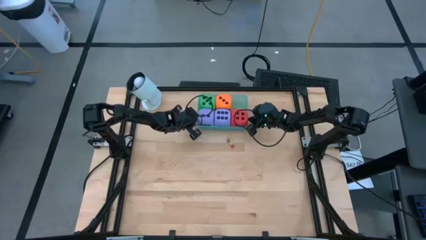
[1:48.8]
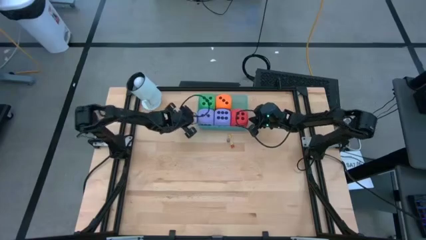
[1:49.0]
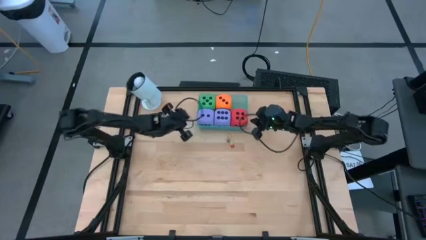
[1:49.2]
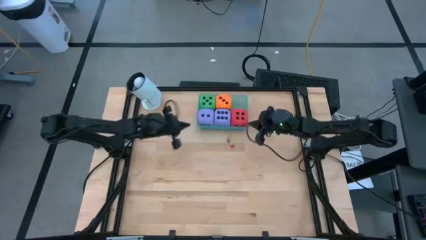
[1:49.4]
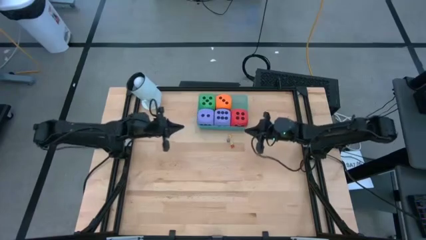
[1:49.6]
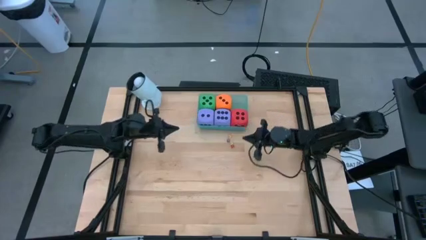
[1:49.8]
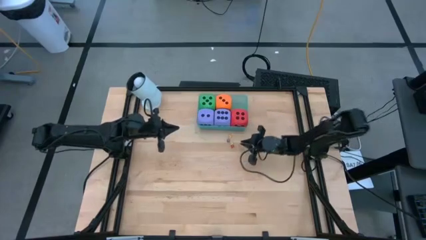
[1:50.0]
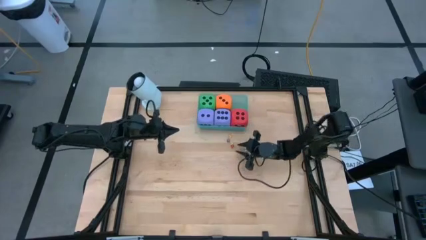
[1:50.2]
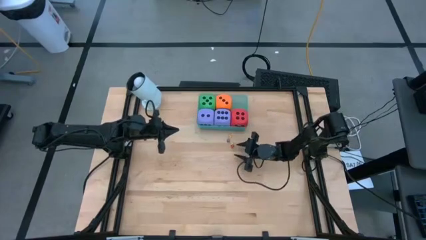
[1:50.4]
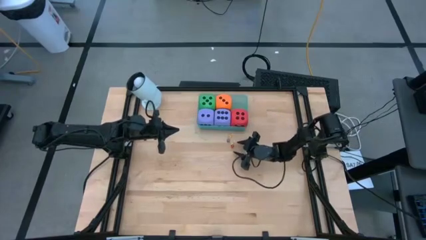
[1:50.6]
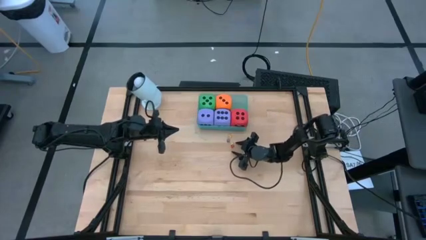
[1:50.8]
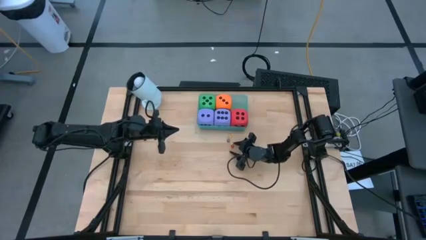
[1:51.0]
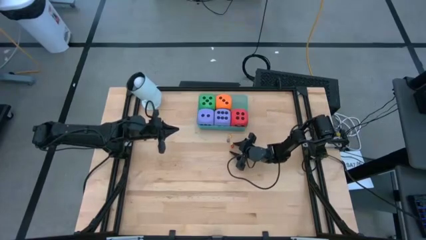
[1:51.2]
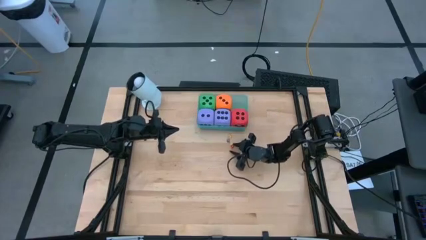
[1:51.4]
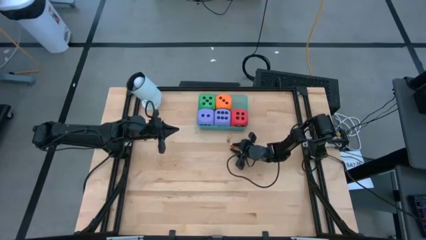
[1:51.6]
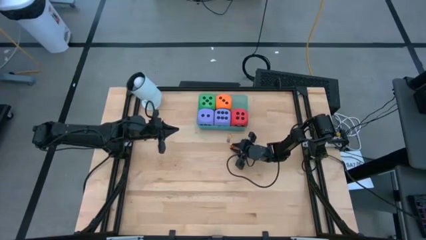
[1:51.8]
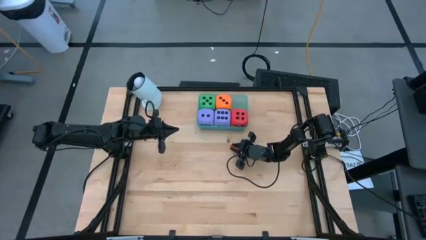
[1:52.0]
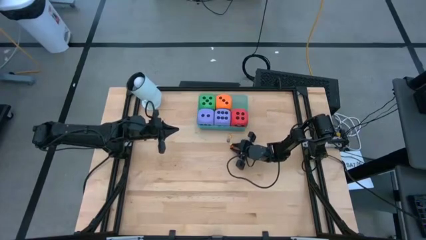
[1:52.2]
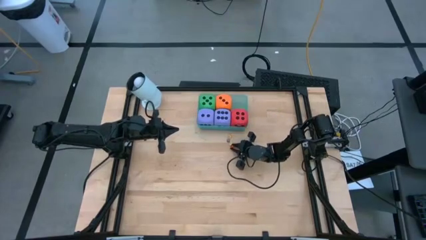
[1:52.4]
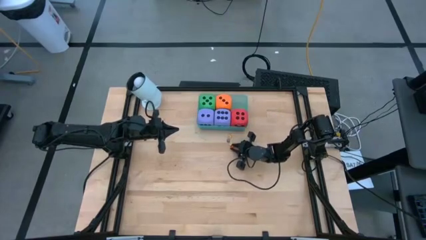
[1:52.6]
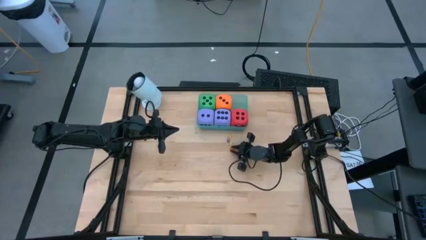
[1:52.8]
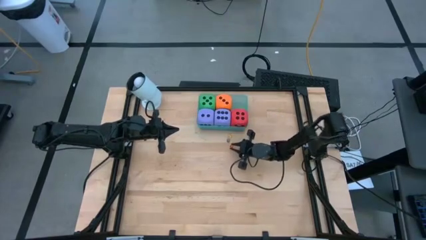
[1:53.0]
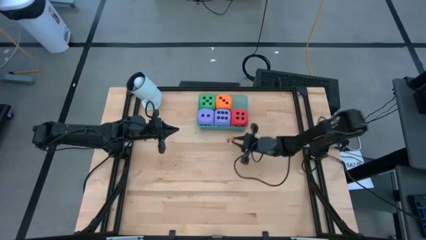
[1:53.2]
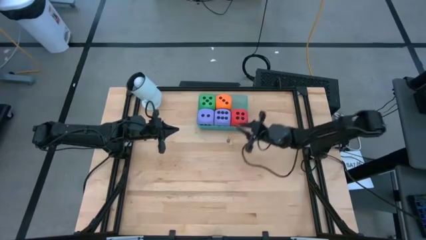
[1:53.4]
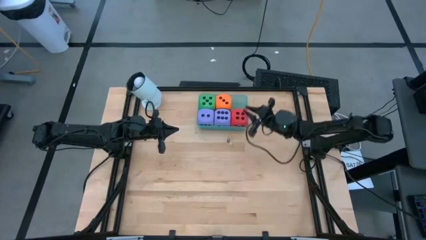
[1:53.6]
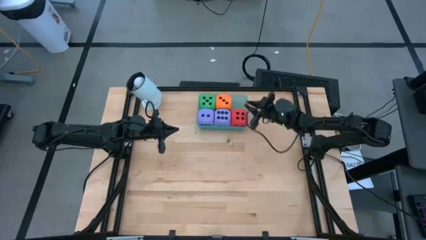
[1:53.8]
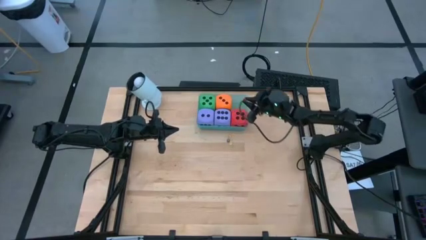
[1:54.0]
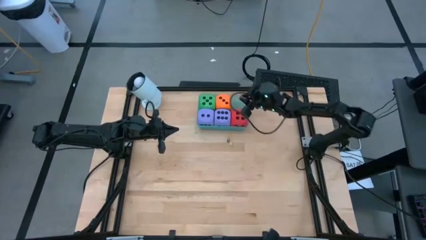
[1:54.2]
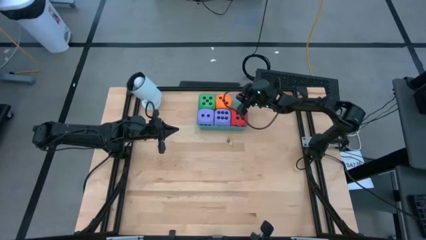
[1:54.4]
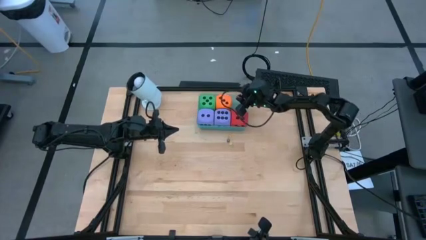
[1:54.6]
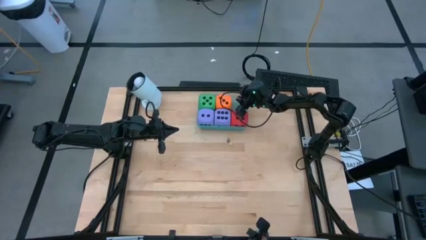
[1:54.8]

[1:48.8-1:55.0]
Task: Pick & Place Dice
Put the small red dice into the green container

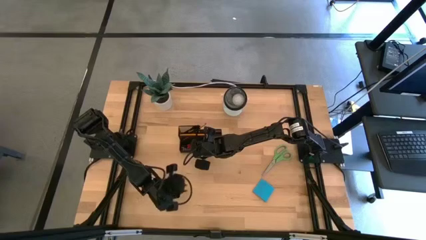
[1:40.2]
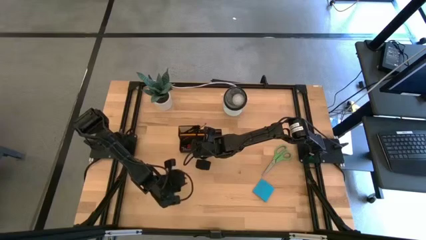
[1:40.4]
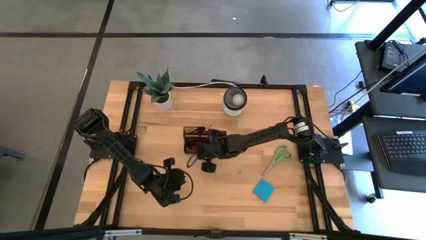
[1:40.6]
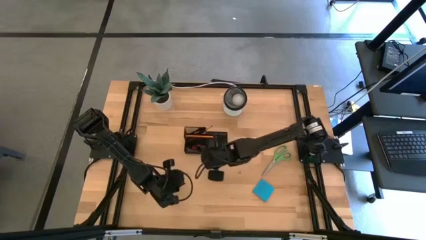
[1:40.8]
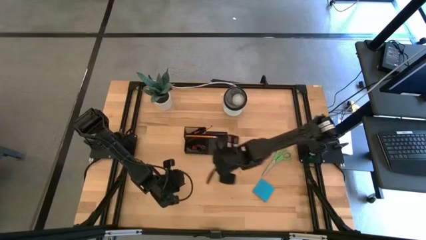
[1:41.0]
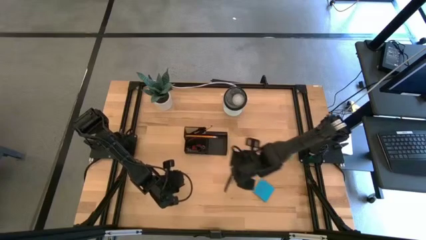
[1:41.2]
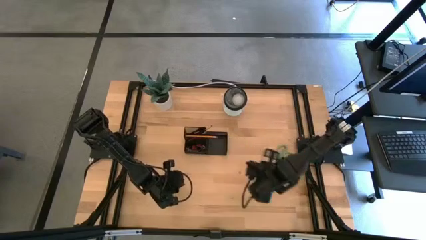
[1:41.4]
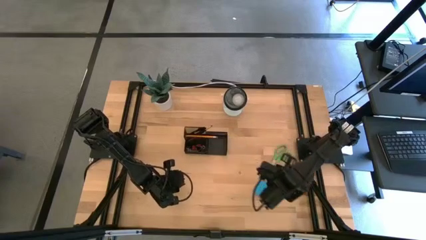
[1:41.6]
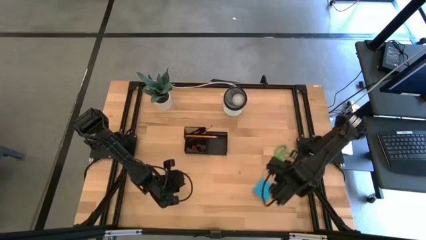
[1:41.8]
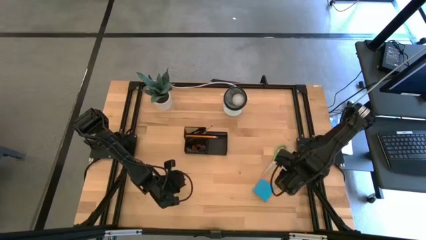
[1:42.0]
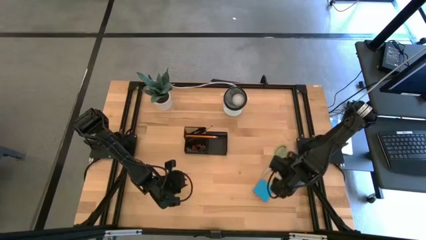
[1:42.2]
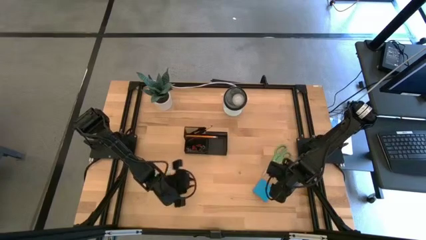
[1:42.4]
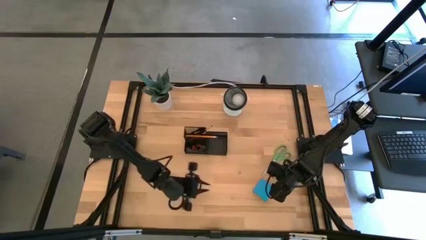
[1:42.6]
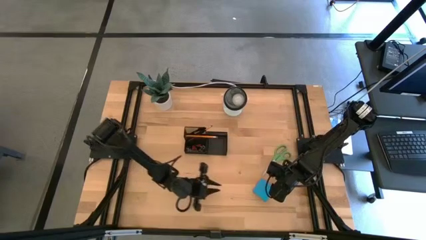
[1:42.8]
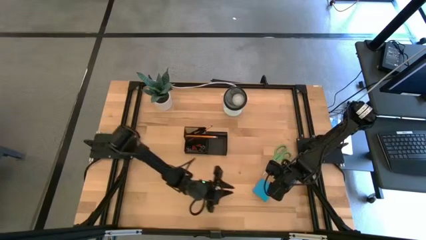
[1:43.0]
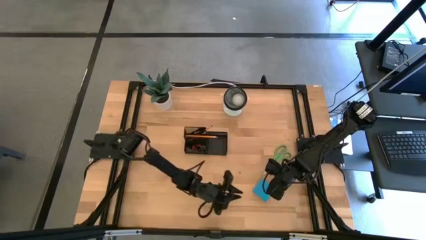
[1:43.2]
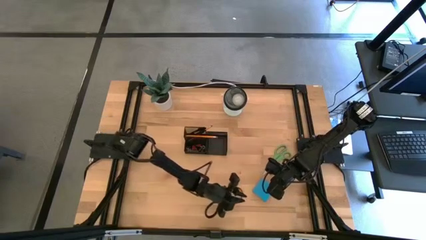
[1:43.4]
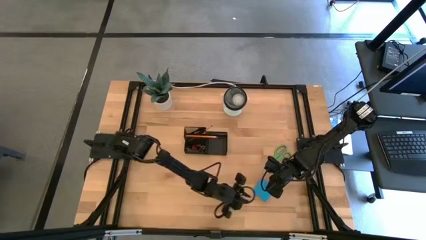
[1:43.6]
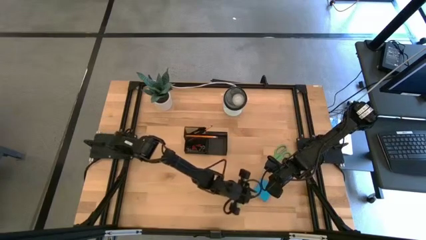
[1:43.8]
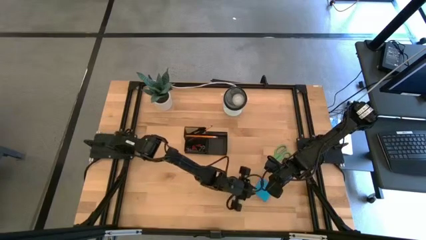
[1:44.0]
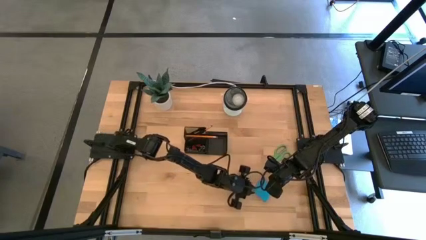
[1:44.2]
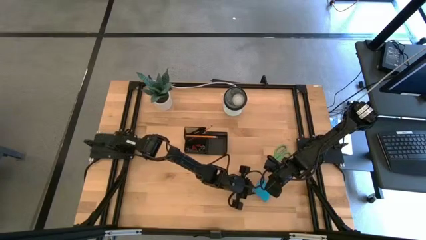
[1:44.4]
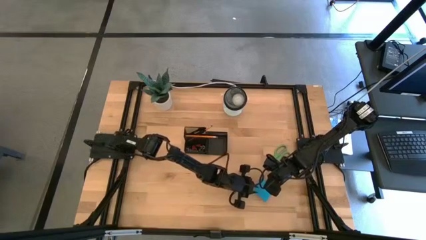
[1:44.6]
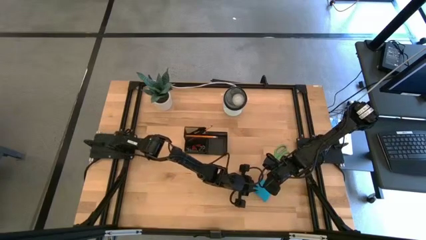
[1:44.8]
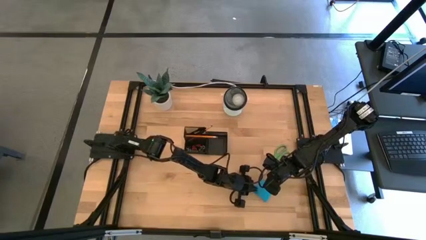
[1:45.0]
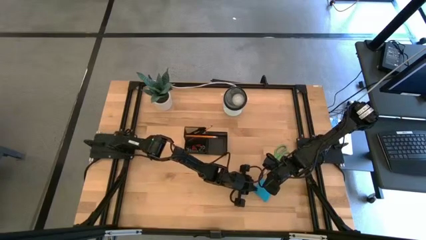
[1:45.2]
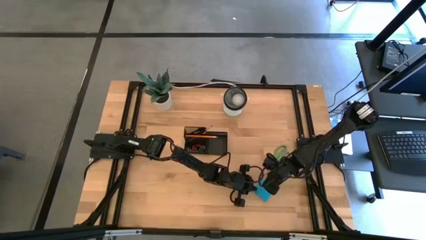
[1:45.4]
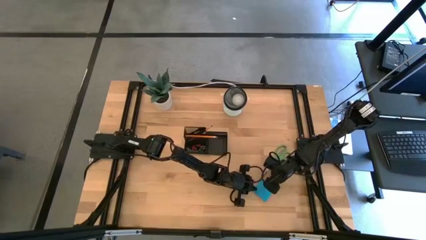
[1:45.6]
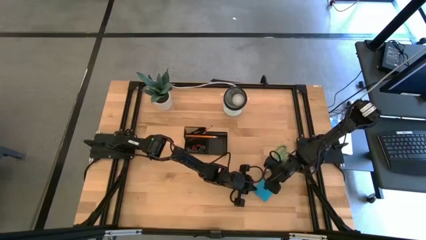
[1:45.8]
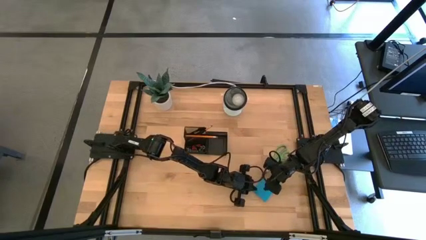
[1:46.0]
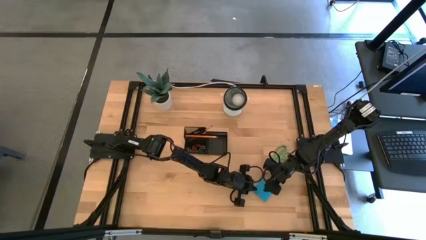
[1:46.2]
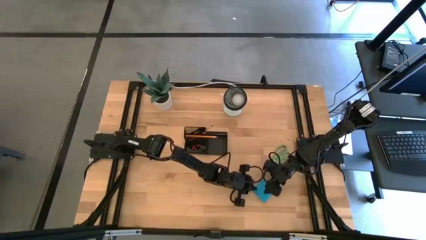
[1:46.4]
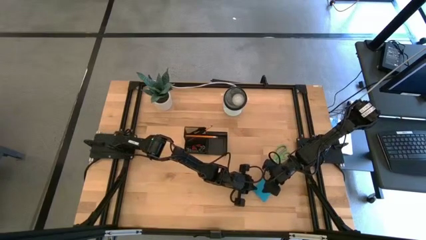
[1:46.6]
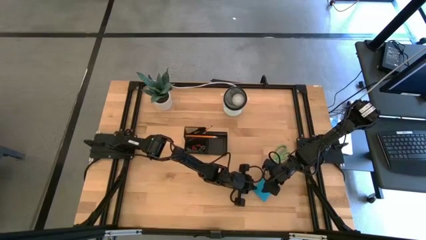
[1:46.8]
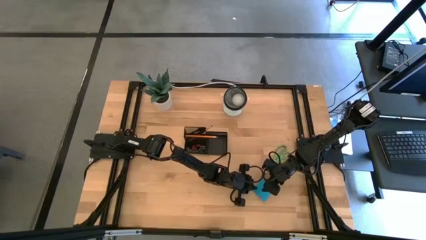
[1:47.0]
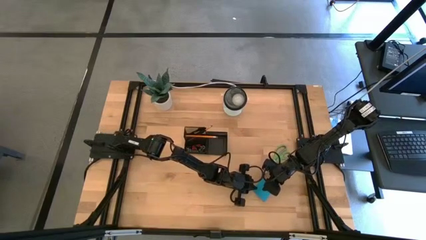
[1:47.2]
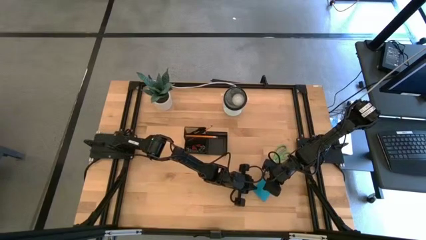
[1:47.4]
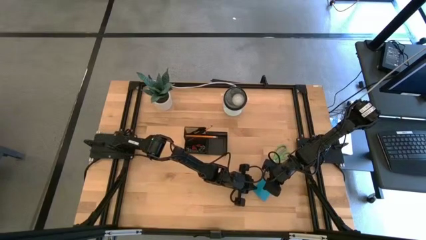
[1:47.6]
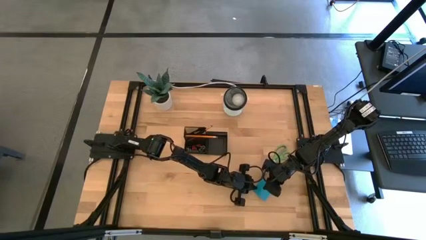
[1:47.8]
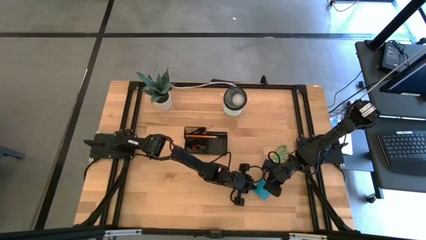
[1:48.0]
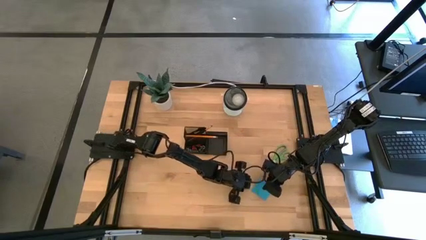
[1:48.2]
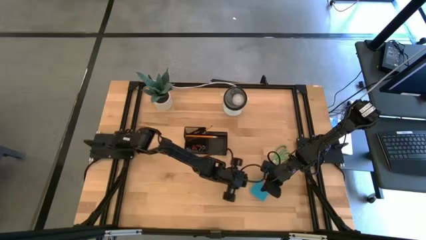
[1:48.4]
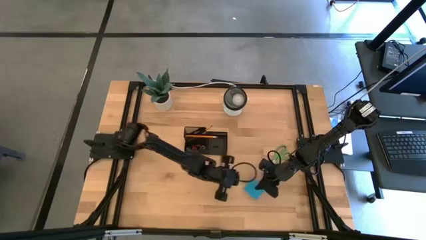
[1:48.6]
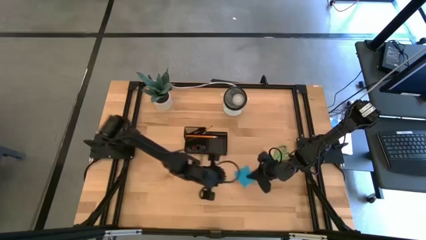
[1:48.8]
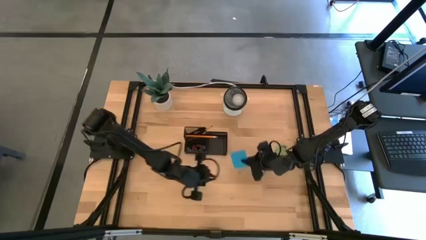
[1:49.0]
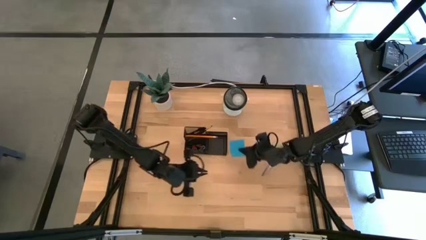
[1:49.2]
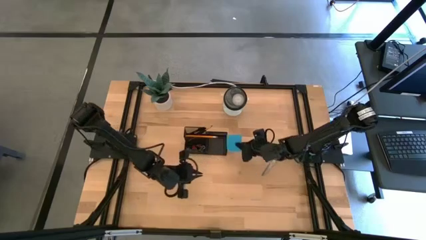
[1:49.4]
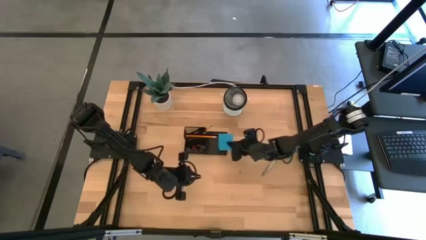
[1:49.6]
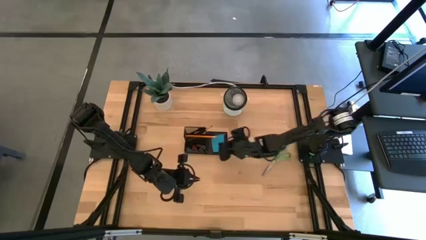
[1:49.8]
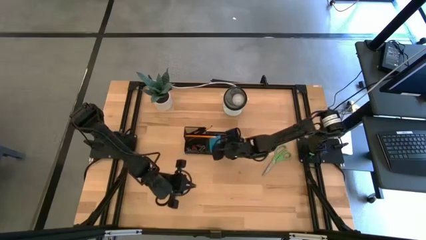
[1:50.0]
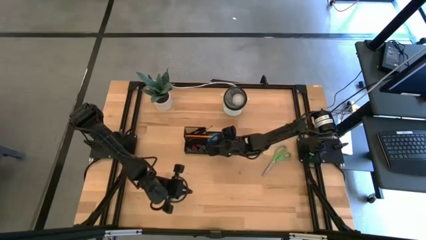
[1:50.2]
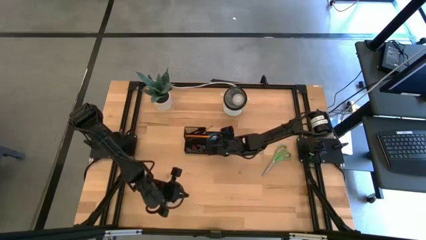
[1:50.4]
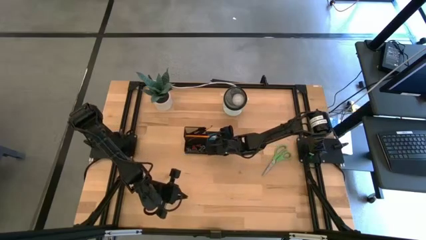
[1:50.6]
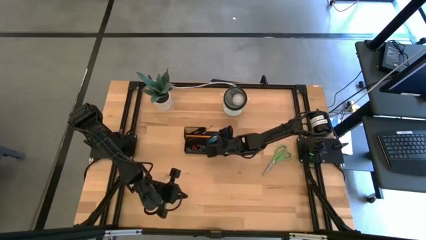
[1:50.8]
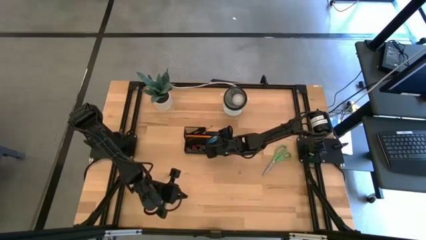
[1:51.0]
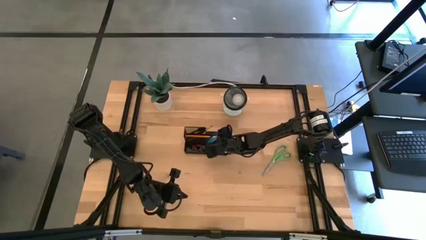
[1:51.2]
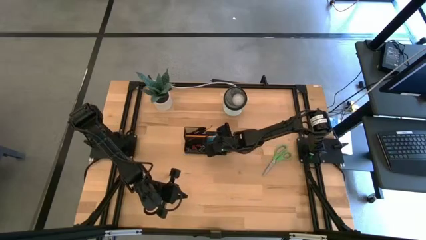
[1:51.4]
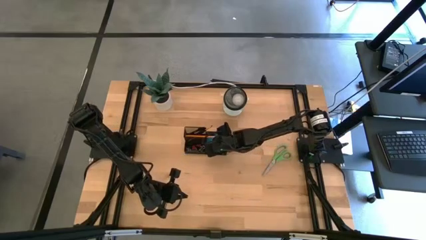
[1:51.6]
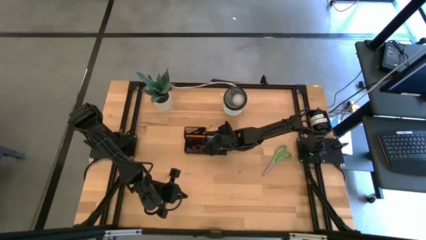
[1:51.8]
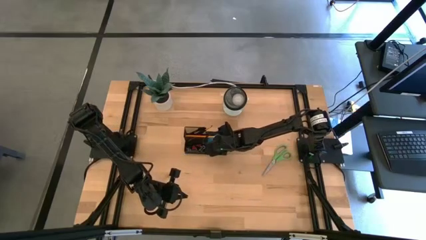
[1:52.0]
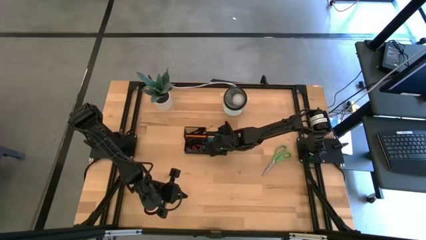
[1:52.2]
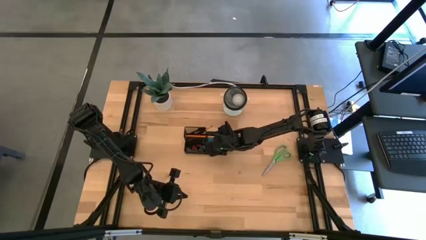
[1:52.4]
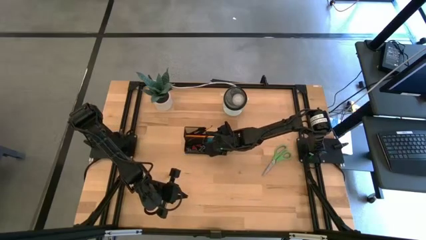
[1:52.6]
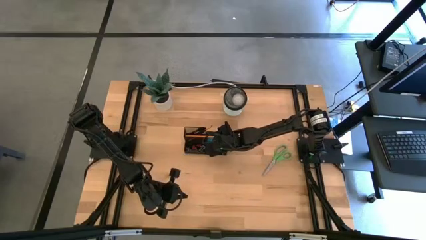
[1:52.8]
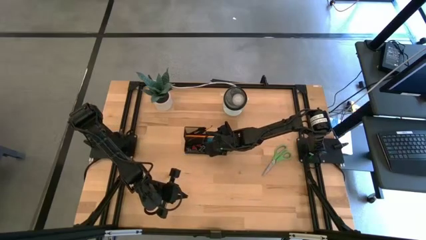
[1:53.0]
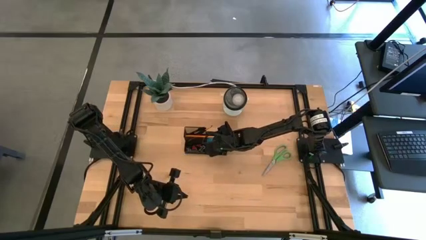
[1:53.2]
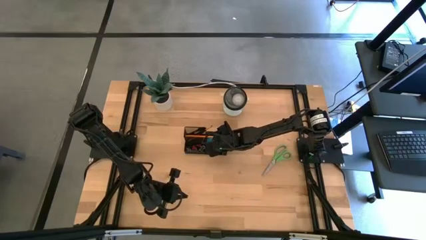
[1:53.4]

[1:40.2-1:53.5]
Task: Pick and place office supplies into organizer
Put the blue sticky note in the desk organizer
